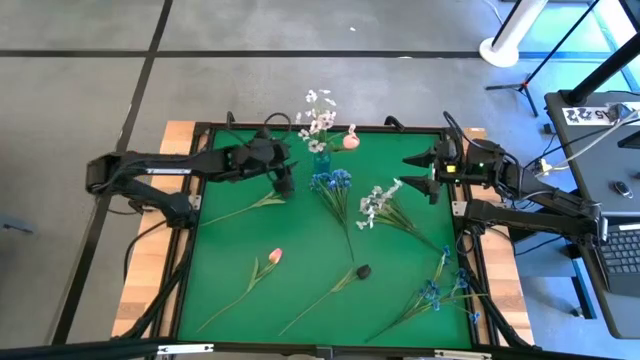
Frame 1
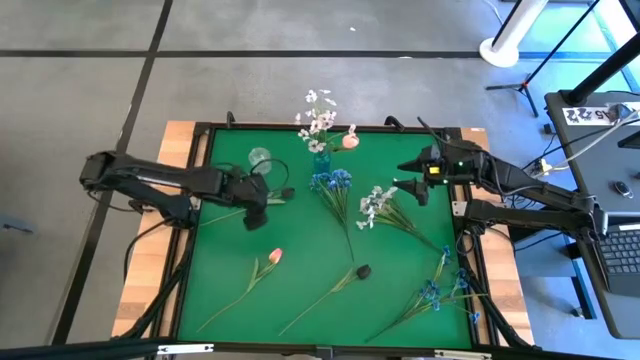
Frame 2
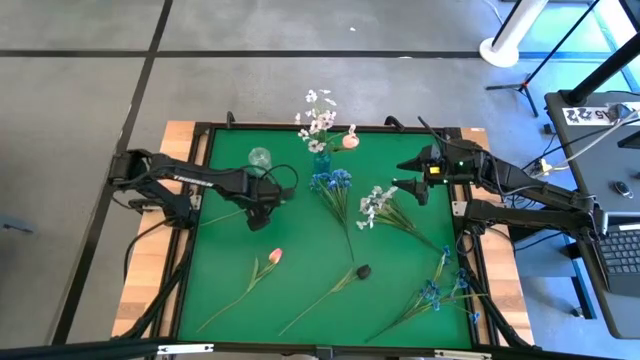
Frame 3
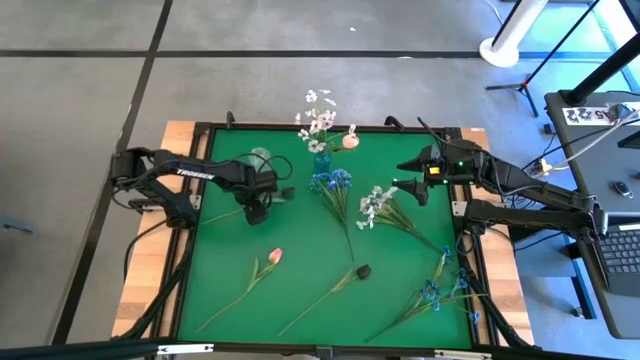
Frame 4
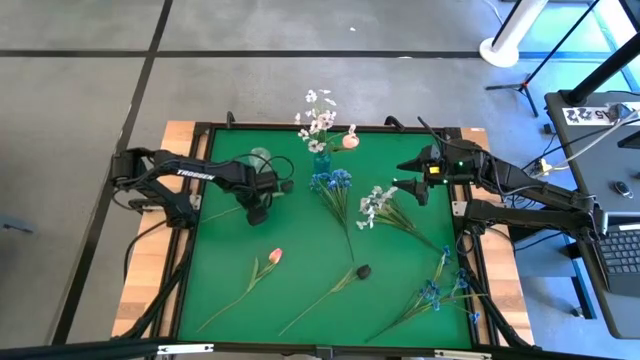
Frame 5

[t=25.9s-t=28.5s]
Task: Sort flowers into vase by color
Put the top black tulip into the transparent vase

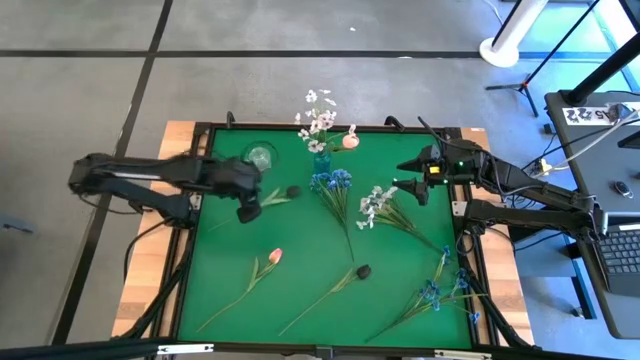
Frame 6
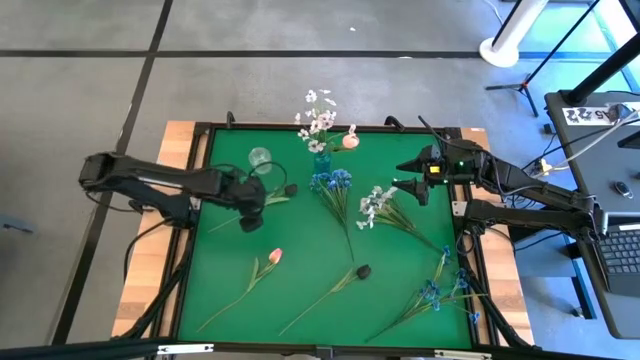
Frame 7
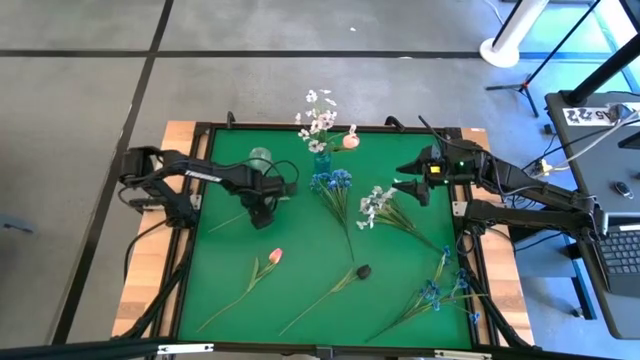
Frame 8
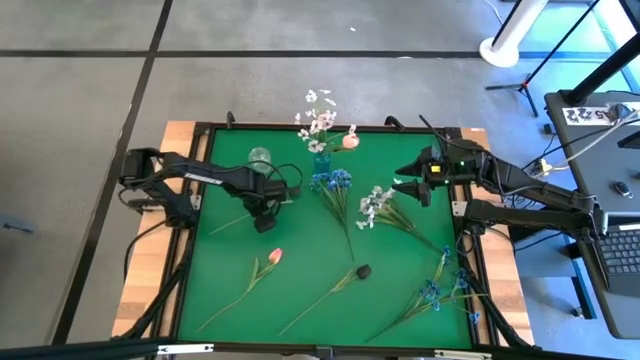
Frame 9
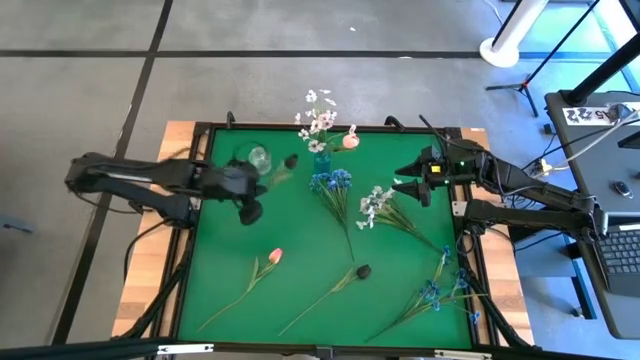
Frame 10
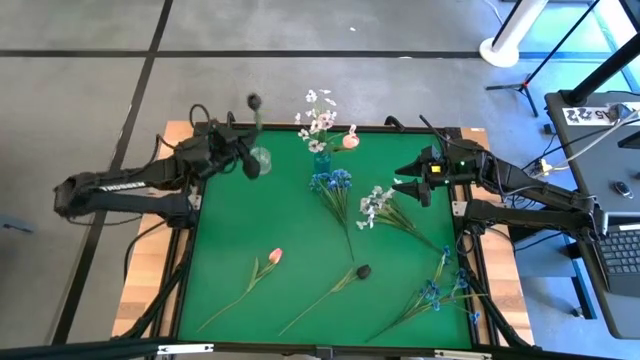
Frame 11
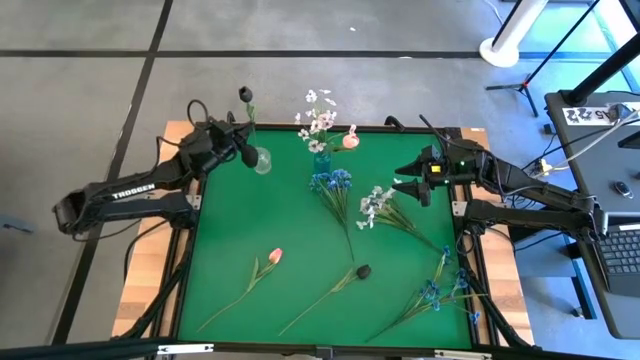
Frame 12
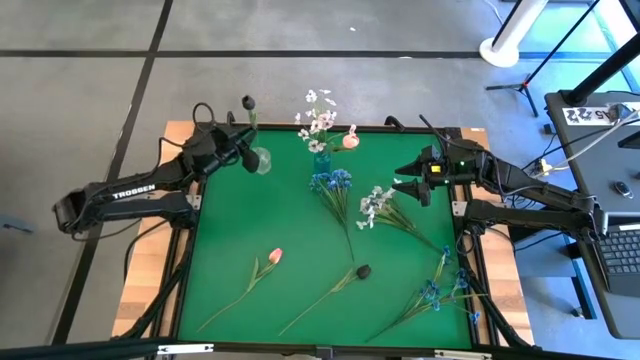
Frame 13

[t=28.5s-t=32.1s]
Put the top black tulip into the transparent vase

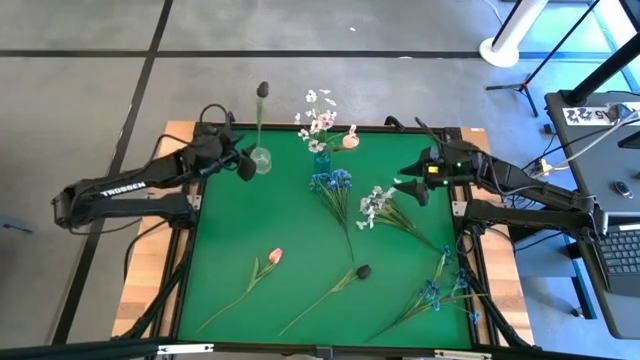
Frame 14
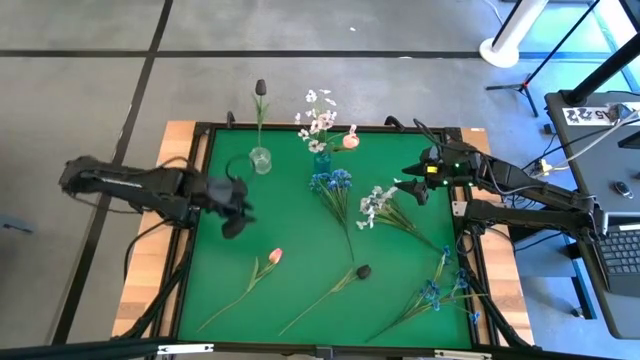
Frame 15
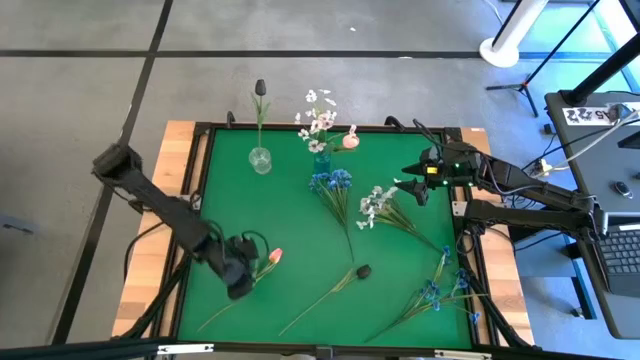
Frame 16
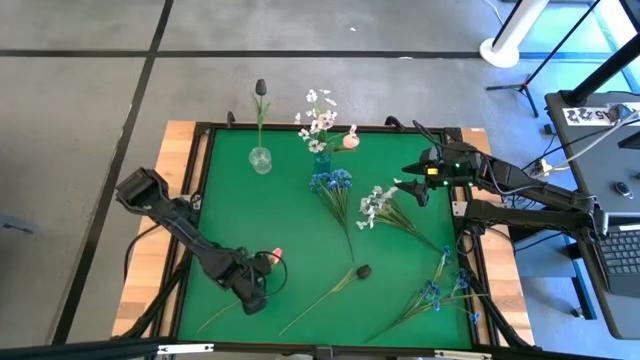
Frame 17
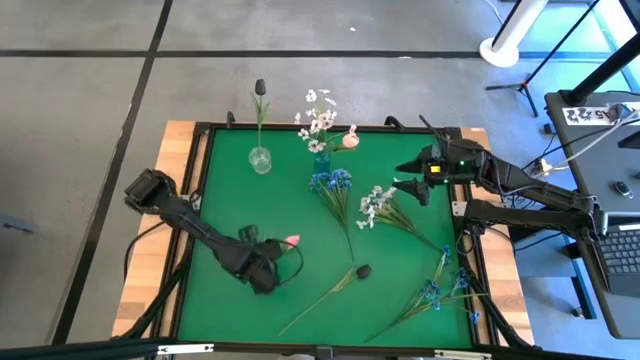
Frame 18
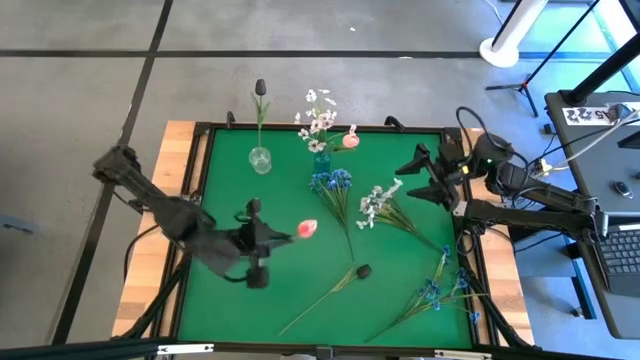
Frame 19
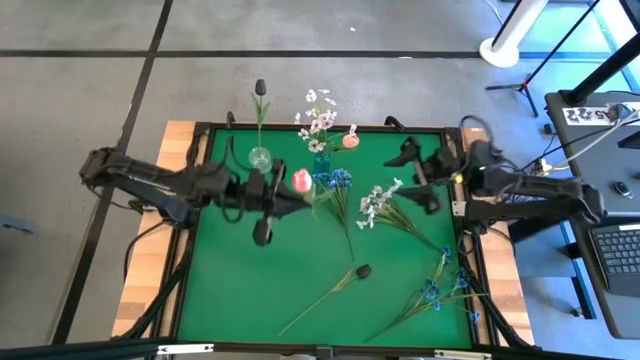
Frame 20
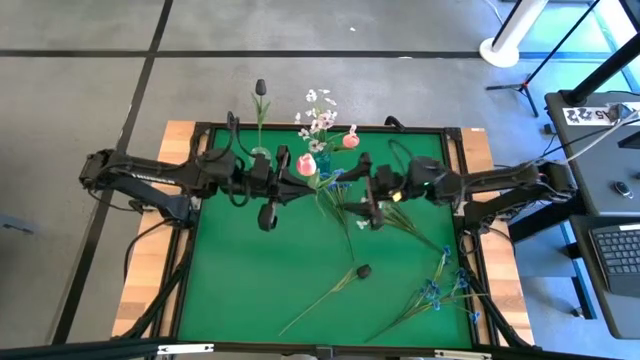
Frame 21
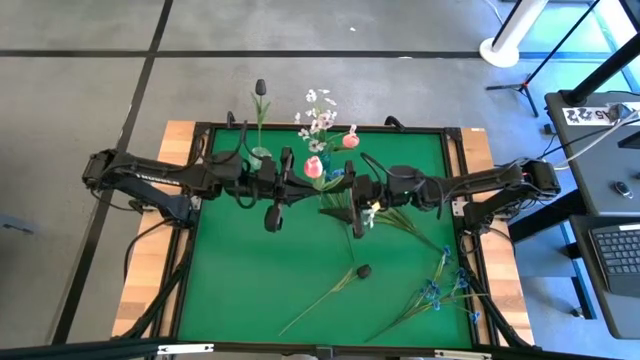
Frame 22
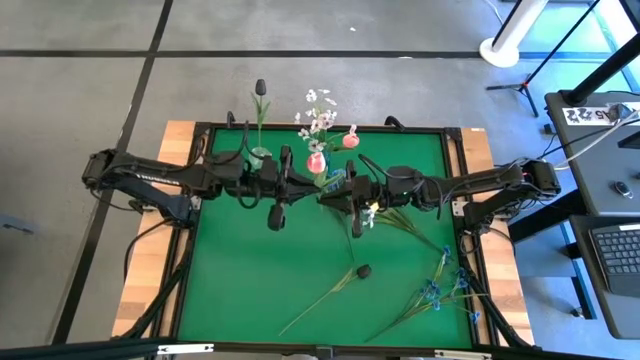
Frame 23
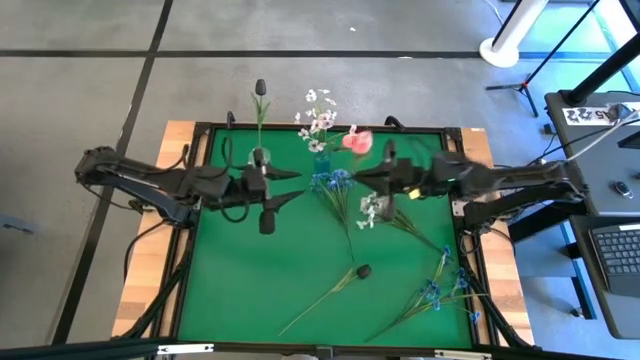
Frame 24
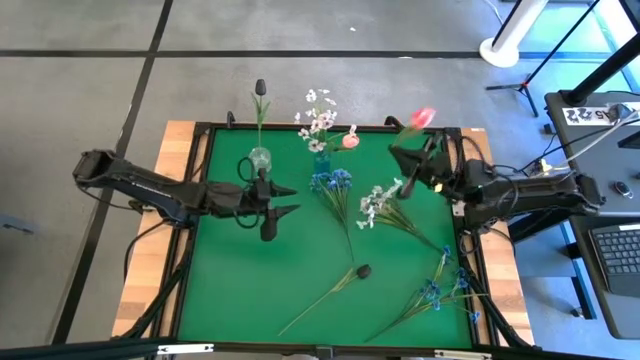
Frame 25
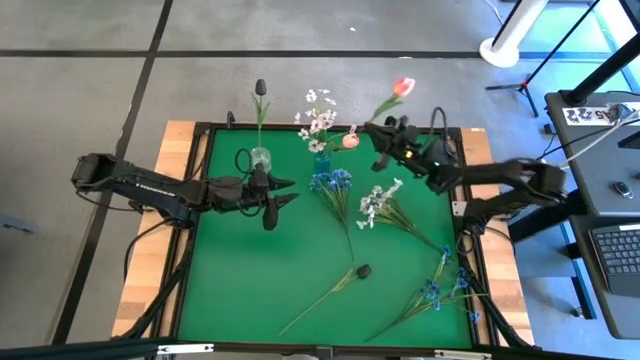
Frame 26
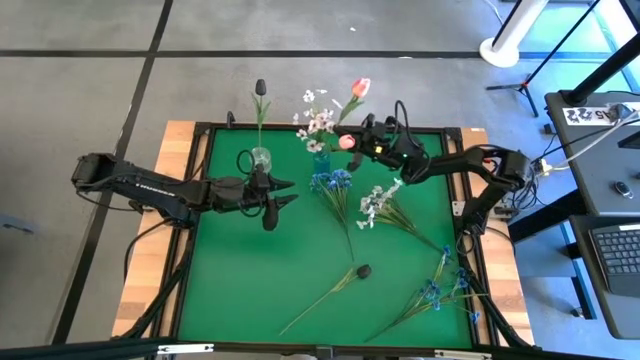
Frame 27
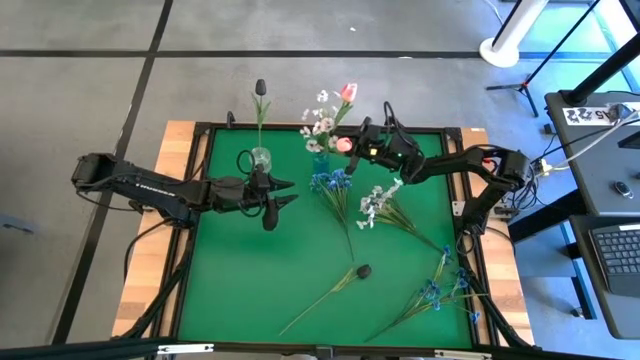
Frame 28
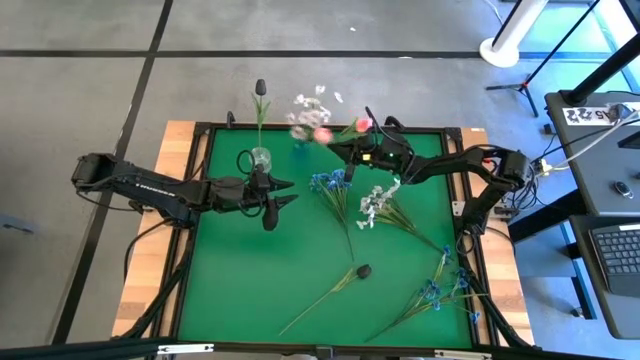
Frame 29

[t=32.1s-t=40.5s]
Put the pink tulip into the blue vase

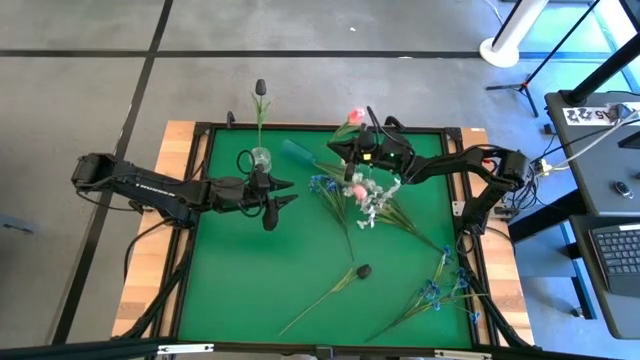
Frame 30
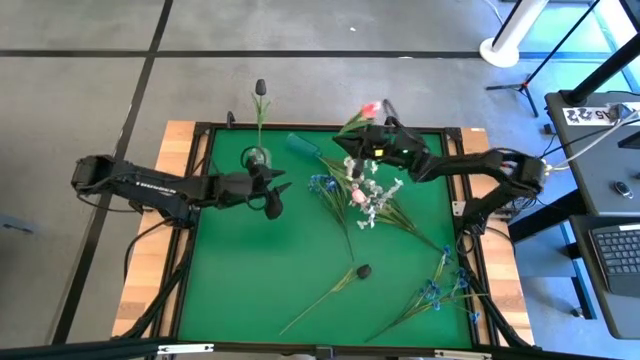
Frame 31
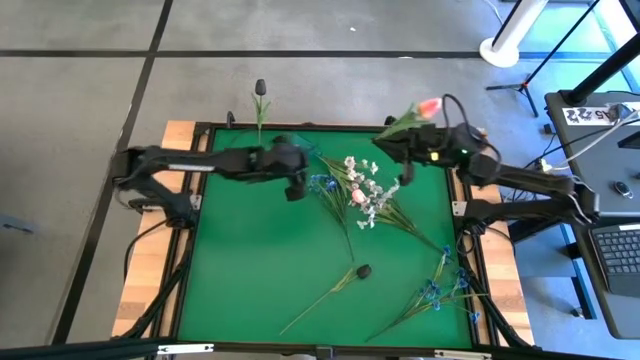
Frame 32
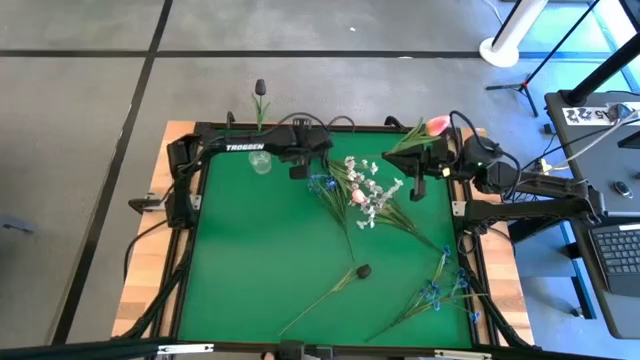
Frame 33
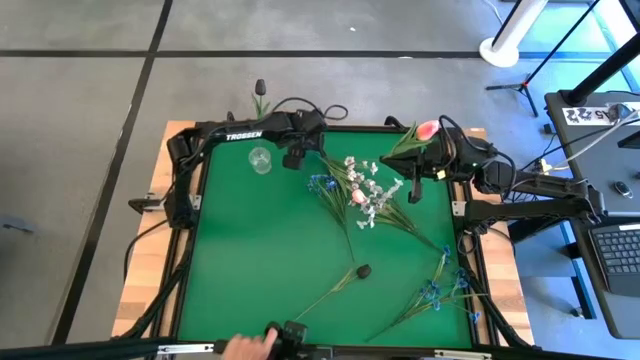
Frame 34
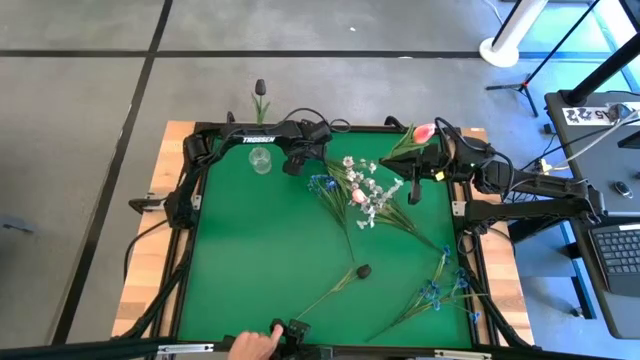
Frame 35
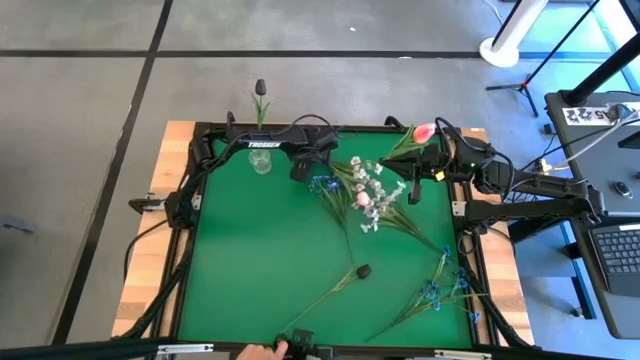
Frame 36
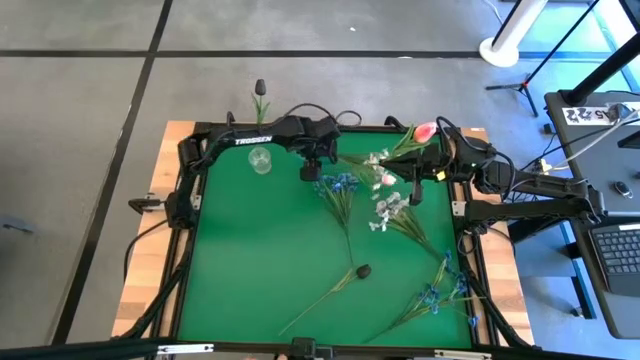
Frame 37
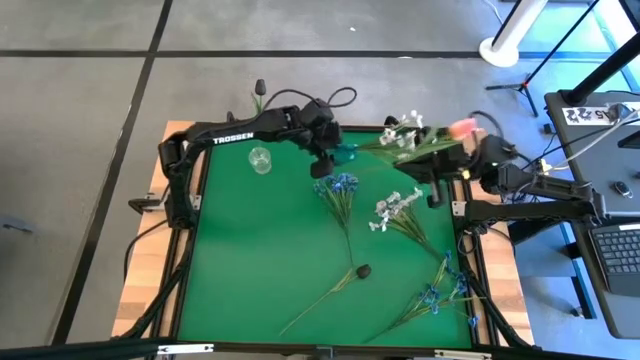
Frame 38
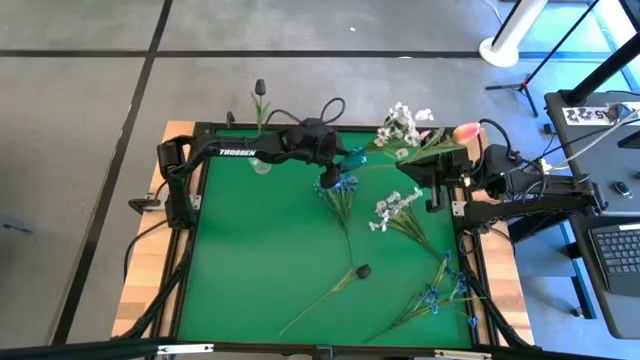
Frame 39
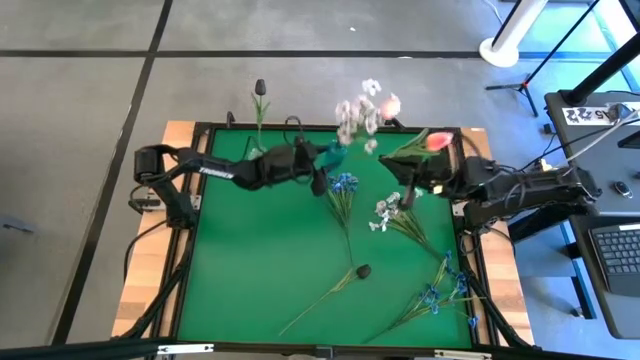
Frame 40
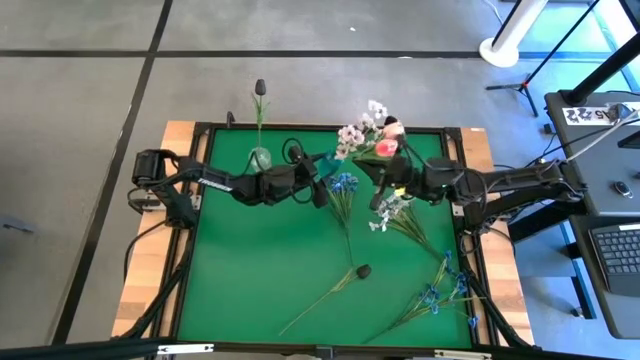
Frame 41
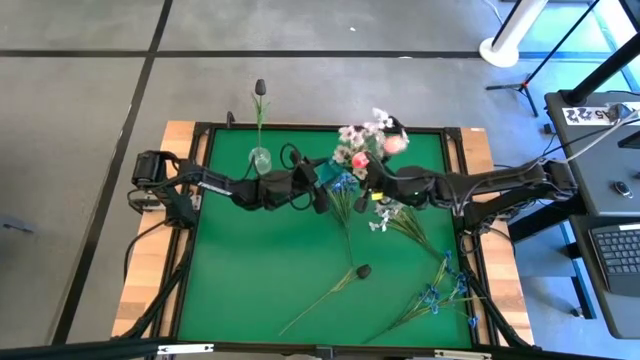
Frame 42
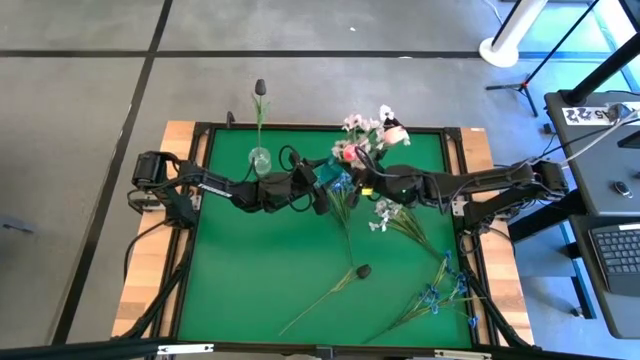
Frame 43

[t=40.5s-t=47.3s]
Put the pink tulip into the blue vase
